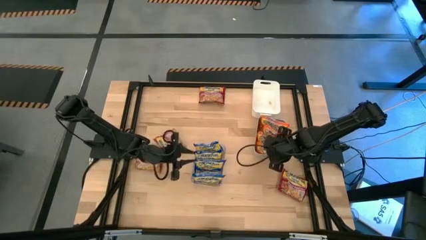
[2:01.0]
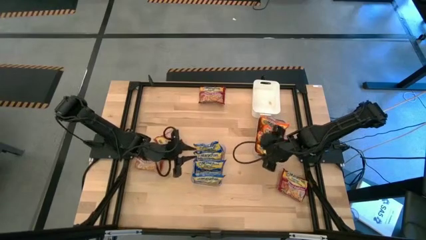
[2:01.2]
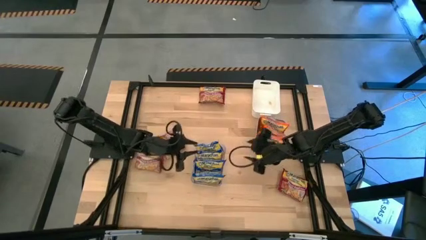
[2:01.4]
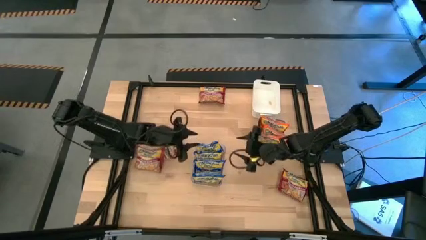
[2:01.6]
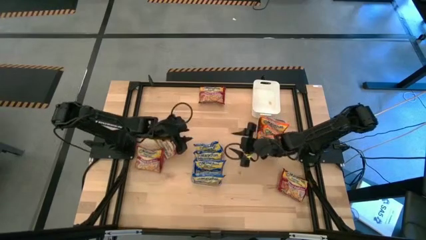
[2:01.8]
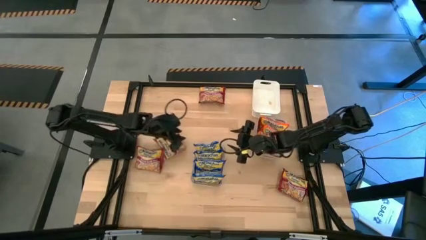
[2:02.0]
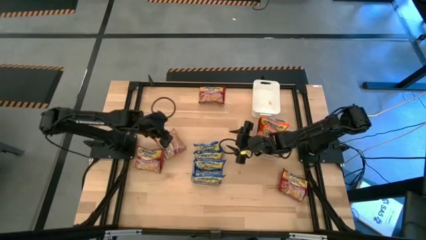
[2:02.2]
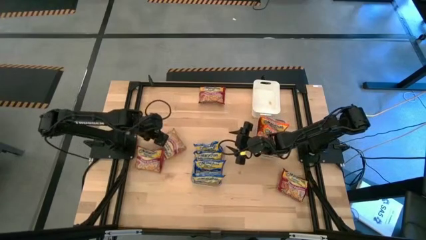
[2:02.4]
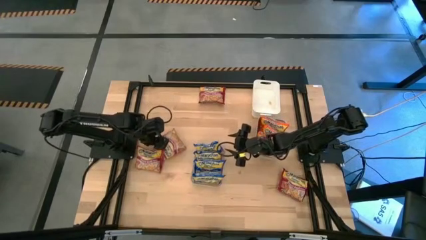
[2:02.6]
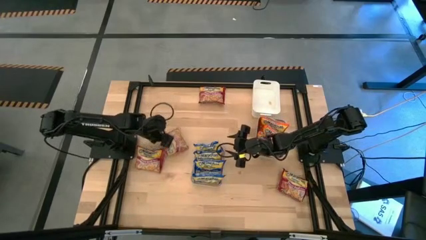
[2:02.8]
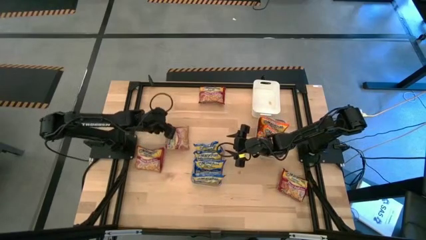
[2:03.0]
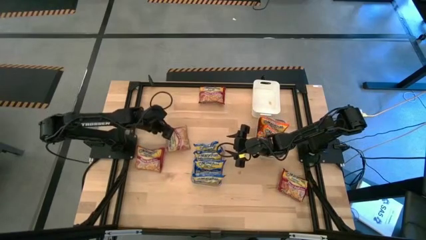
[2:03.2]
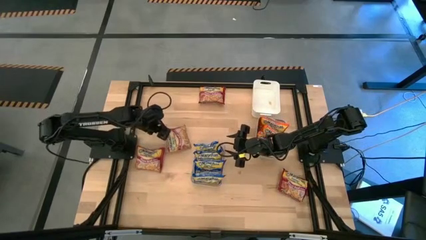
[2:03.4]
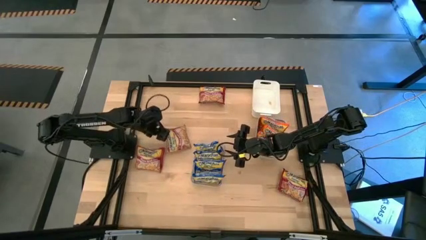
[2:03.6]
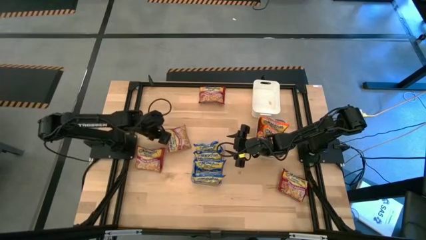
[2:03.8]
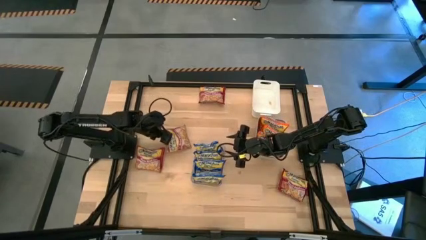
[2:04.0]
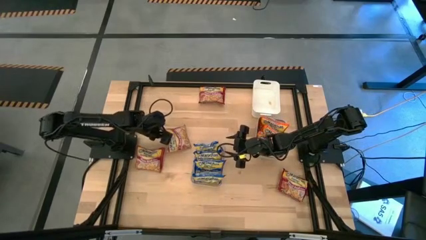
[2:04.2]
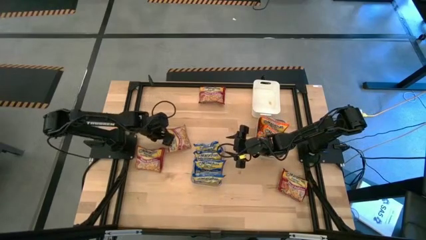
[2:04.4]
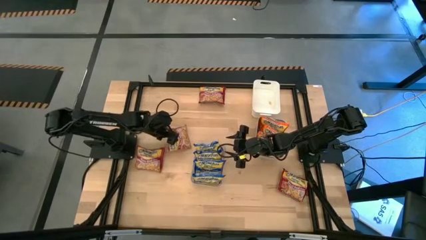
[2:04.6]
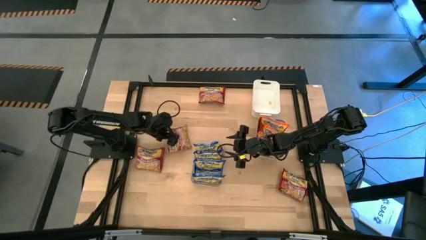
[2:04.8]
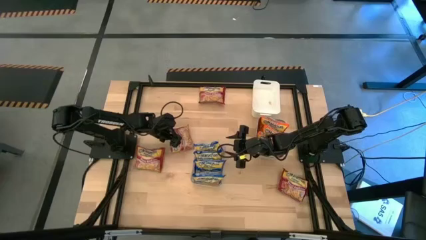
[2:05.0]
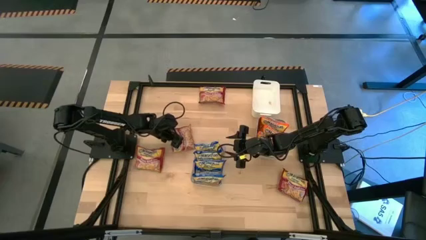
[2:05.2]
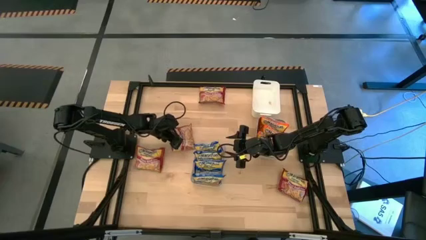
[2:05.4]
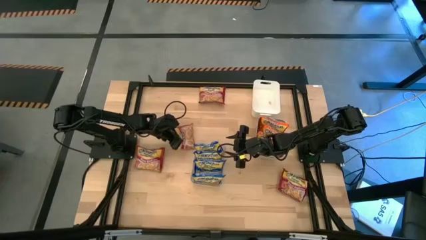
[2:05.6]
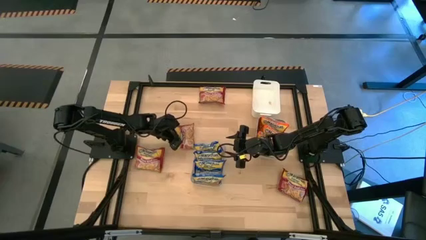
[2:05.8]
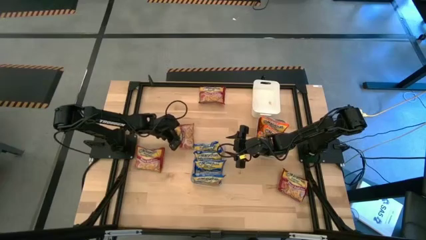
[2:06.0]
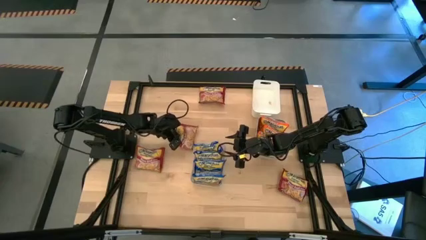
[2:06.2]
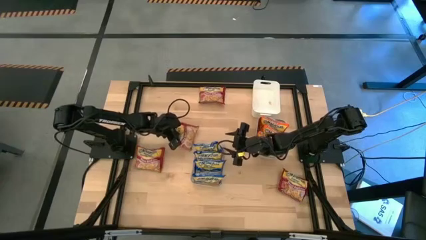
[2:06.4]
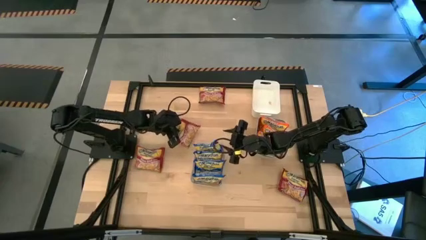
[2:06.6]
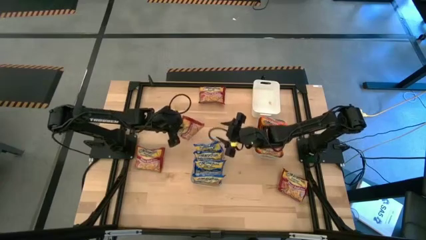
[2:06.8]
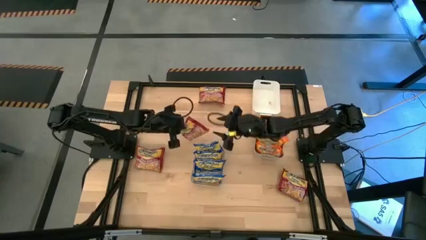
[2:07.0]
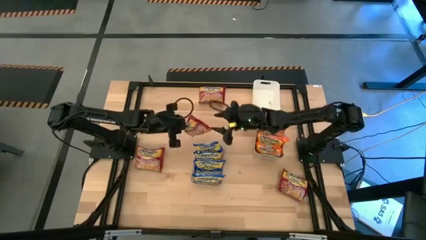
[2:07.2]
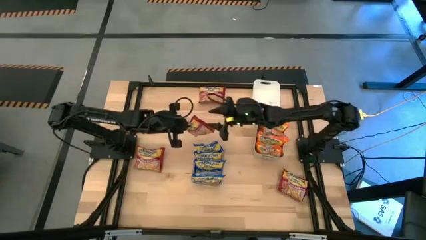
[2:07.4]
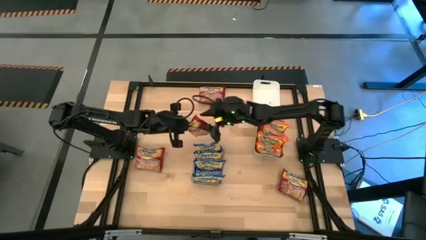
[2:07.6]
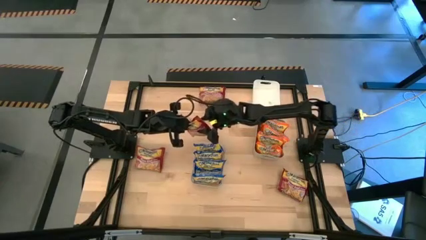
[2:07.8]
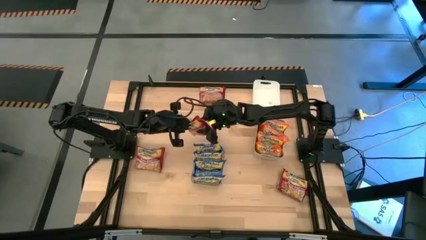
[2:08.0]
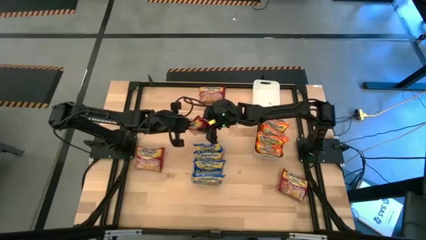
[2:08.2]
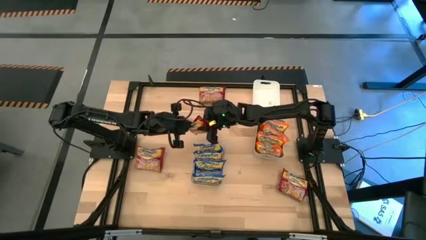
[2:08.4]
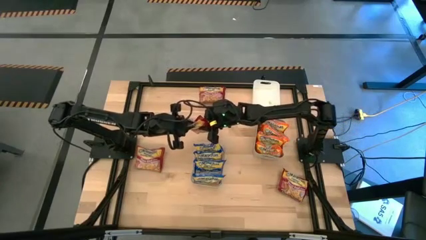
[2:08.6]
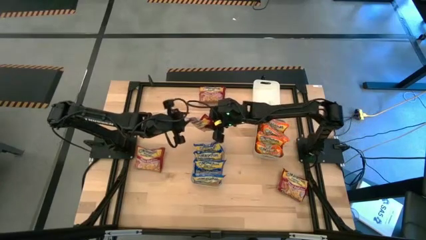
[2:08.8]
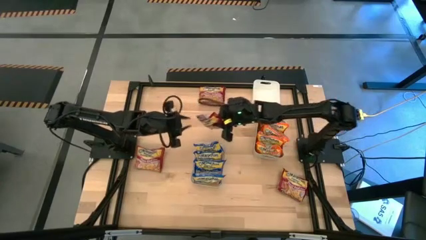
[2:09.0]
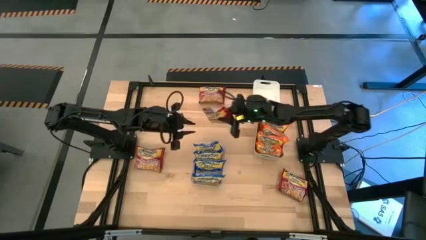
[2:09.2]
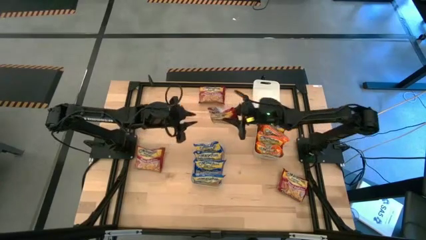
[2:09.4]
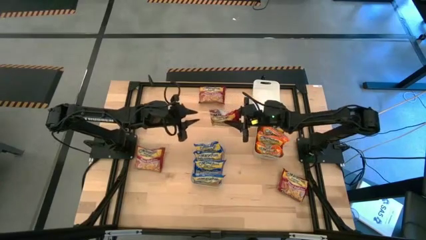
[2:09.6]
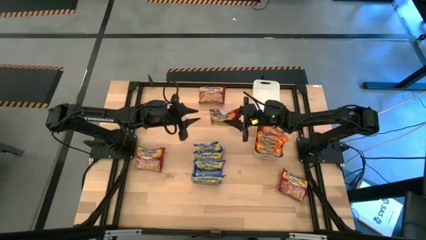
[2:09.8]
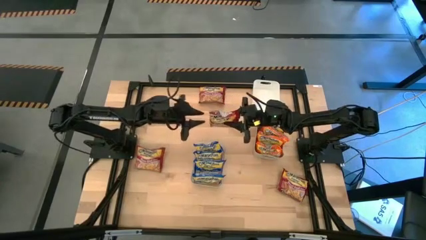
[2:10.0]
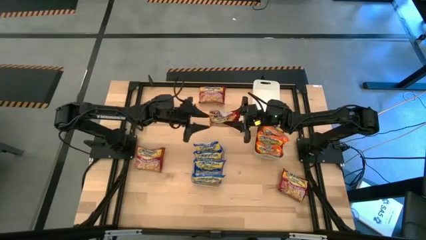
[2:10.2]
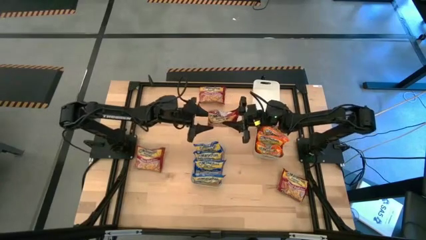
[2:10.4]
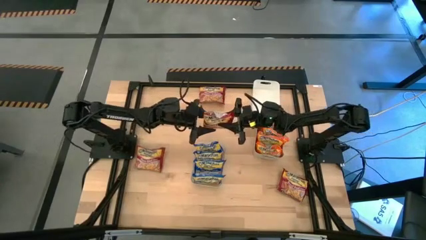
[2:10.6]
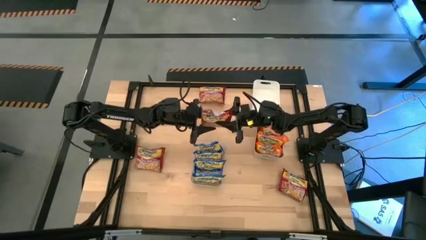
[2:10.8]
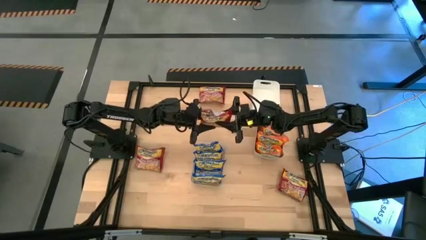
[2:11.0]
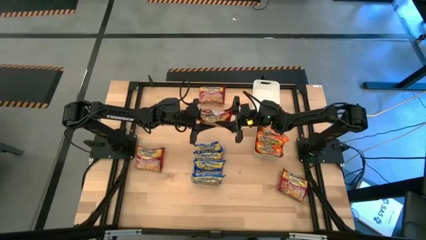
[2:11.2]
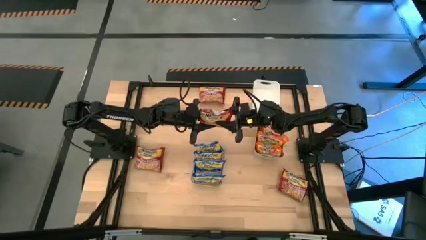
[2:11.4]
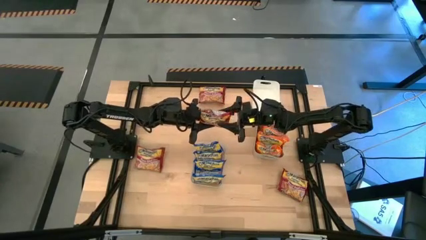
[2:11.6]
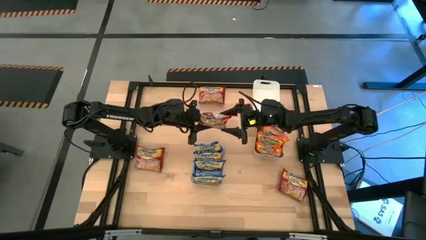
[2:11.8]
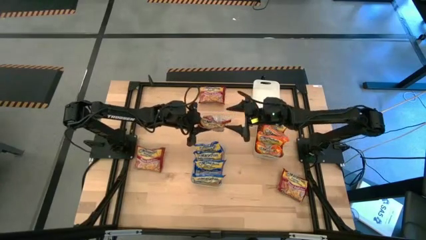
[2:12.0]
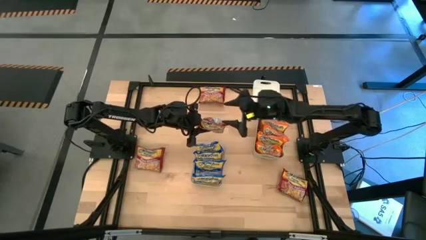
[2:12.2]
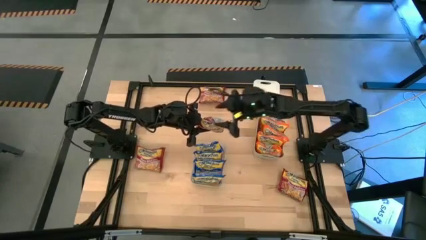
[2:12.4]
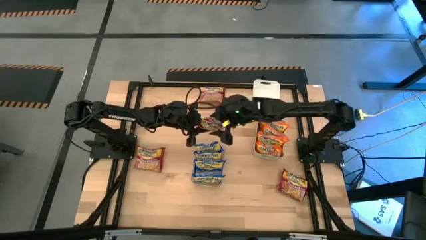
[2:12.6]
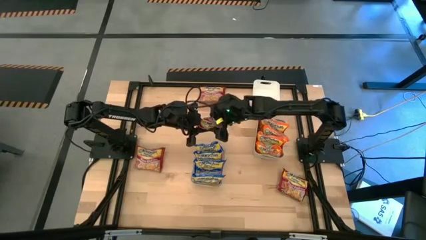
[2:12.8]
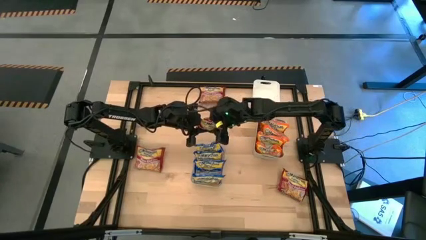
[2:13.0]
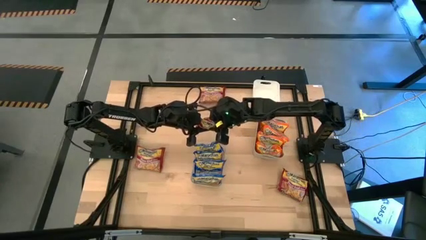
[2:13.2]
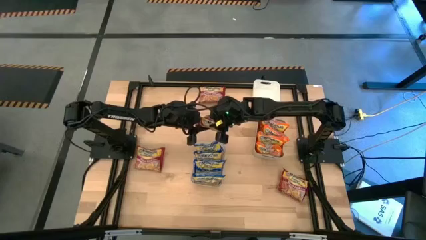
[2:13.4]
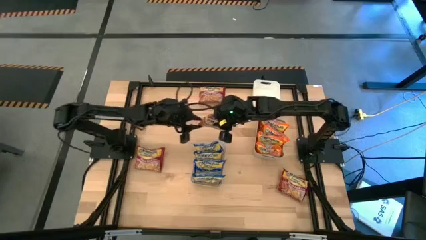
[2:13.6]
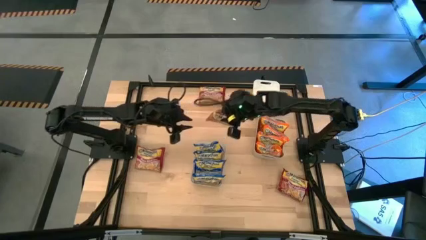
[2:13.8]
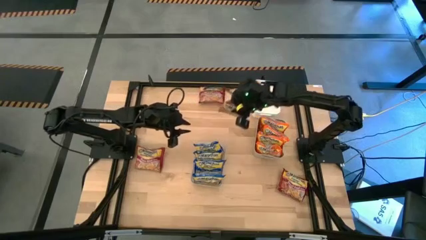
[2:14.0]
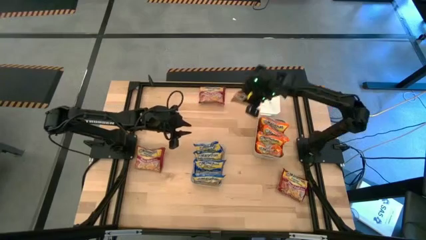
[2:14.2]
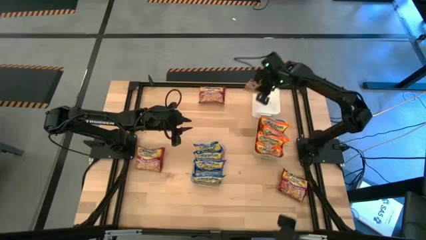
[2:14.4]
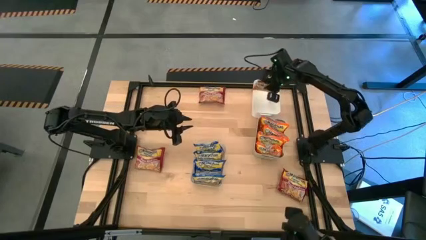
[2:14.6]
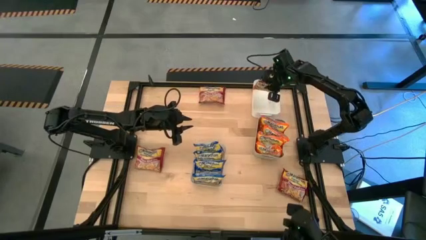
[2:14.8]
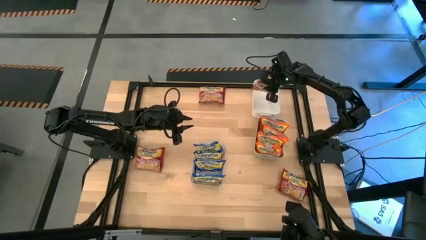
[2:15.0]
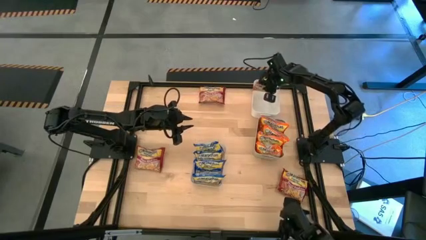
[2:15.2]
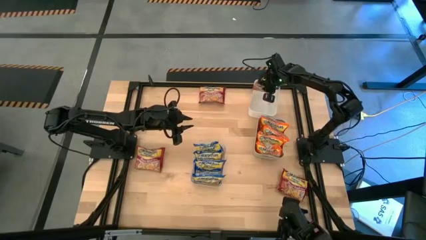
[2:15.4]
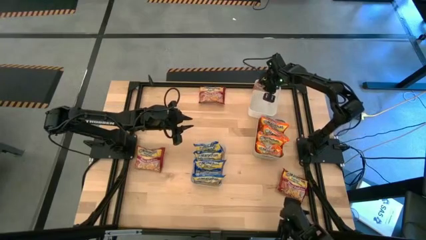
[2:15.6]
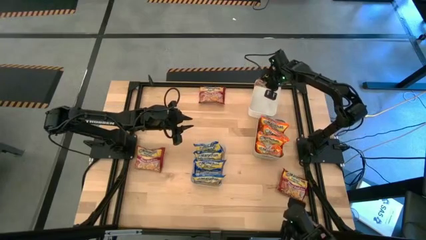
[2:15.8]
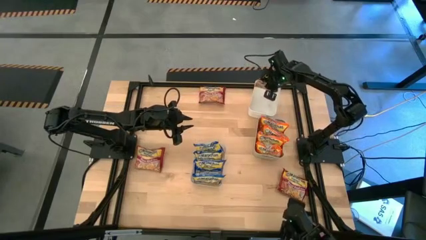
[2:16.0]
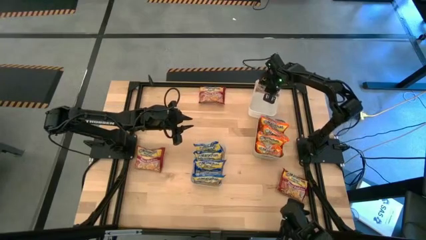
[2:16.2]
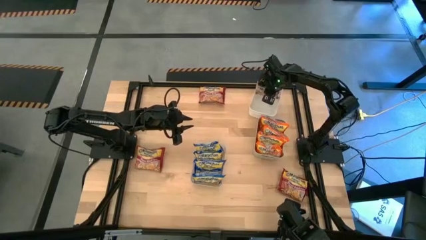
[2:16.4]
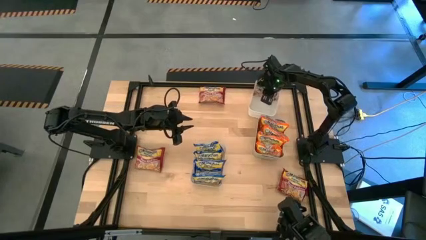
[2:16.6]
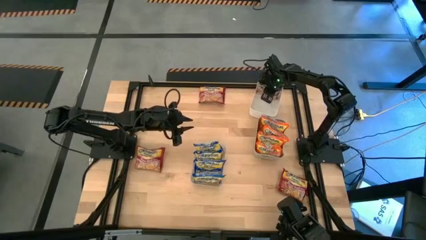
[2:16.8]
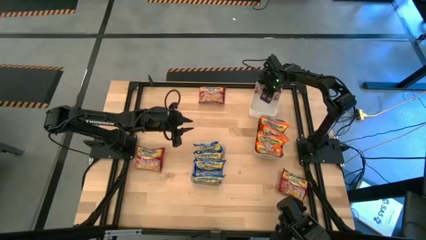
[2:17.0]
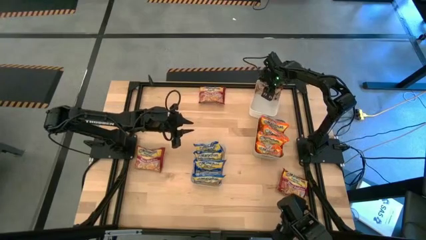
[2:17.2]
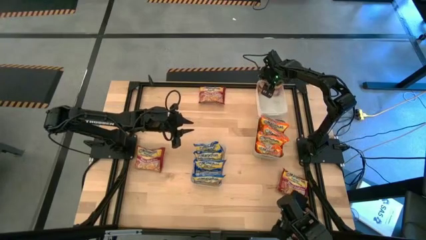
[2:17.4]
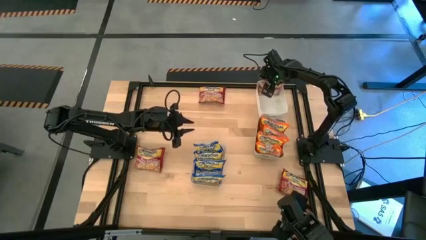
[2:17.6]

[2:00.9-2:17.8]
Task: Sort Maruchan noodles
Put the red noodle pack into the white bin
